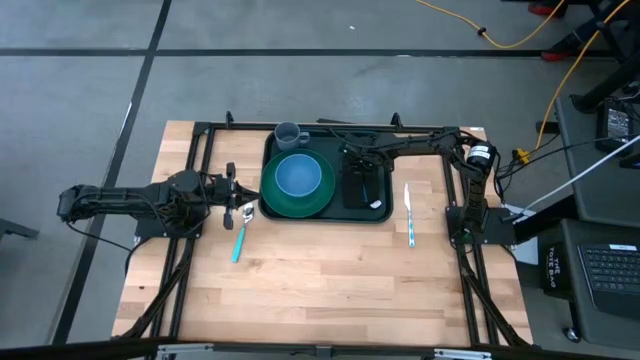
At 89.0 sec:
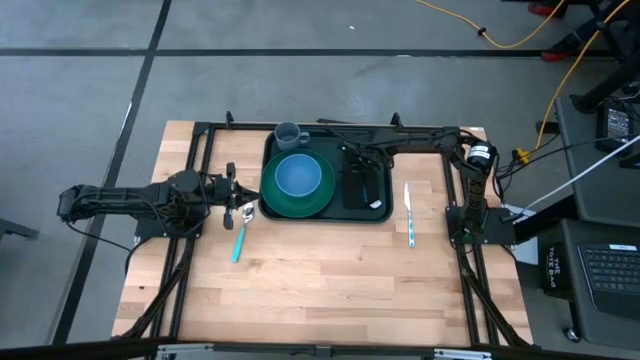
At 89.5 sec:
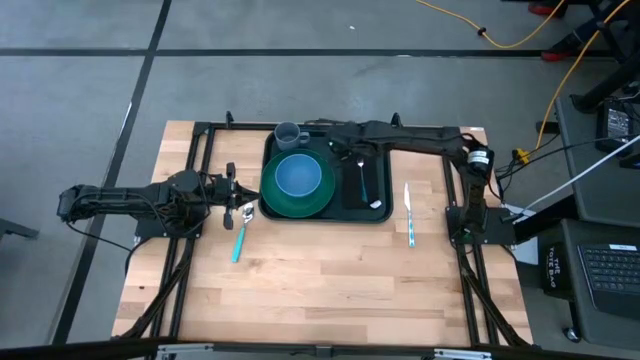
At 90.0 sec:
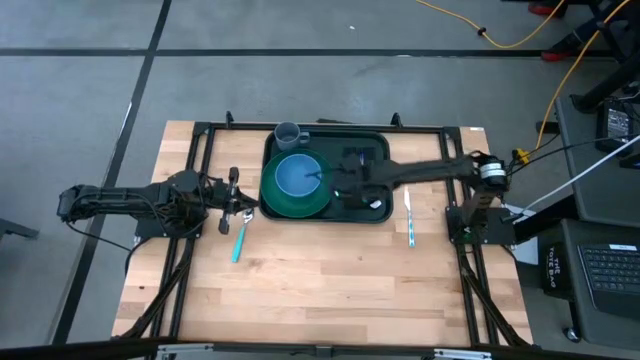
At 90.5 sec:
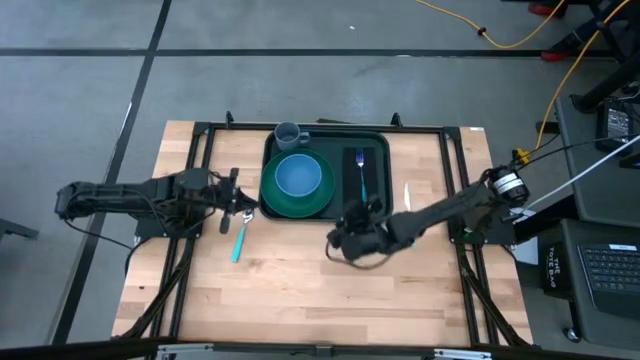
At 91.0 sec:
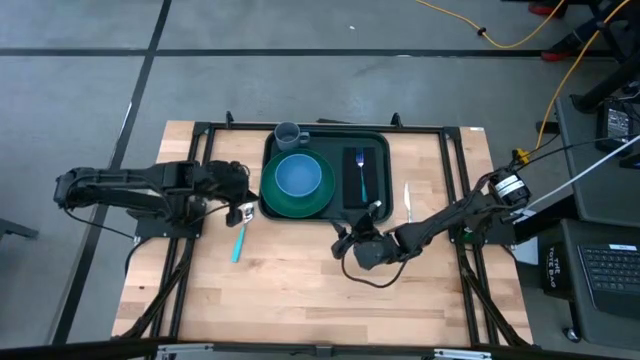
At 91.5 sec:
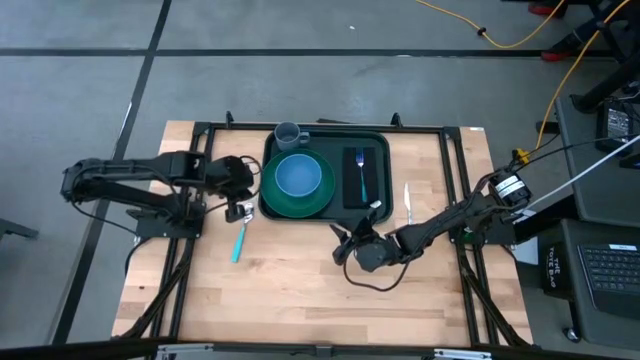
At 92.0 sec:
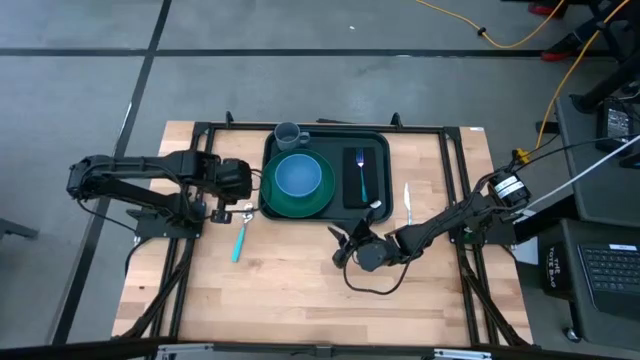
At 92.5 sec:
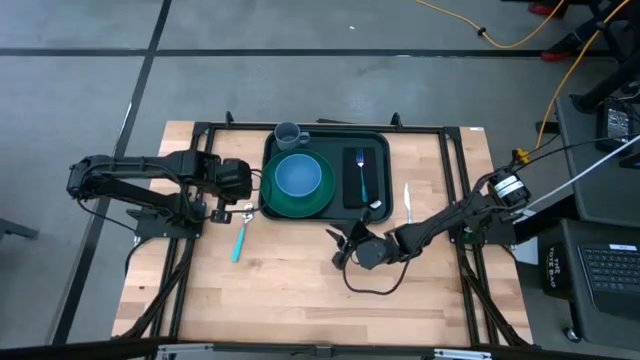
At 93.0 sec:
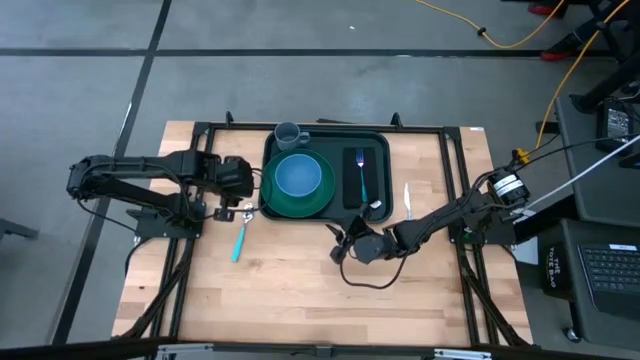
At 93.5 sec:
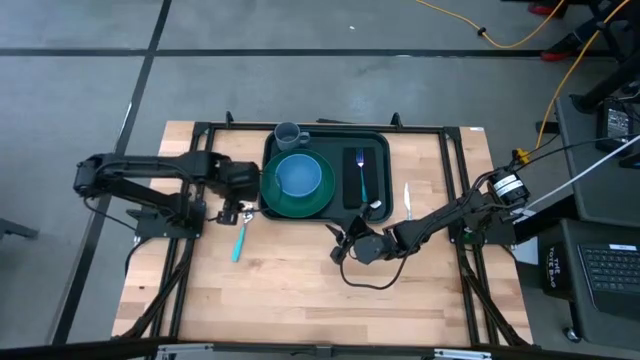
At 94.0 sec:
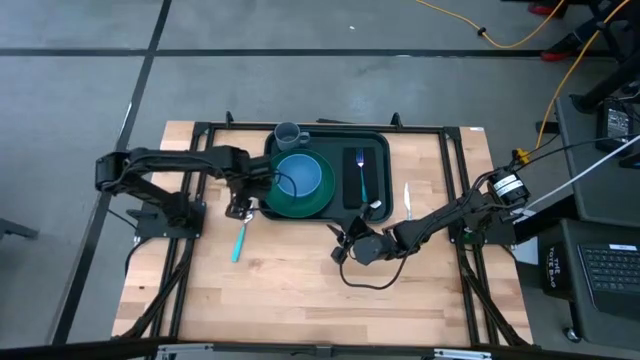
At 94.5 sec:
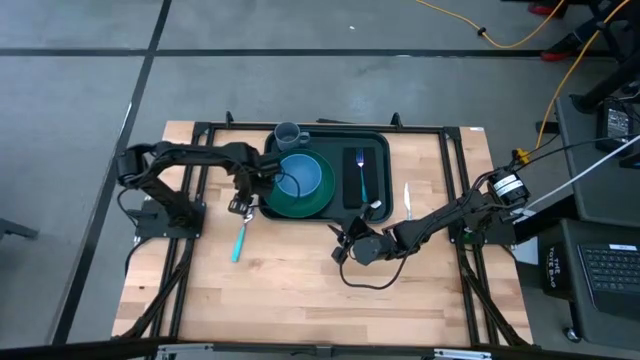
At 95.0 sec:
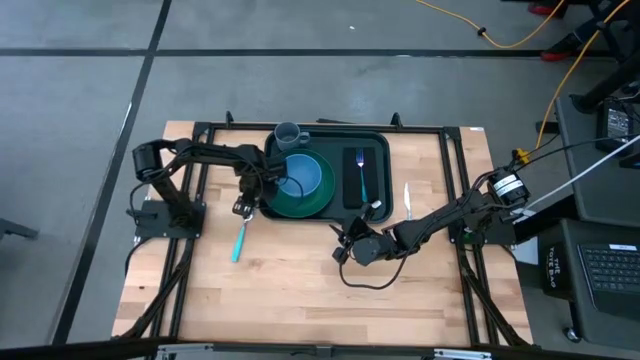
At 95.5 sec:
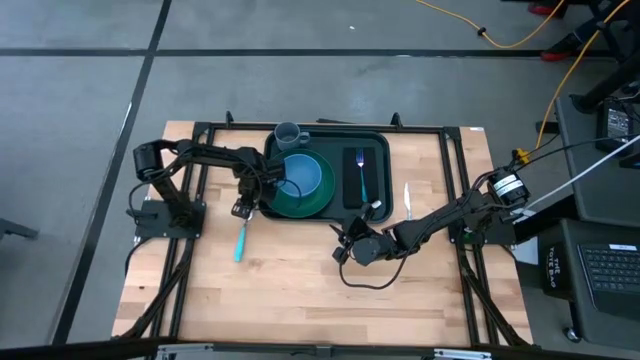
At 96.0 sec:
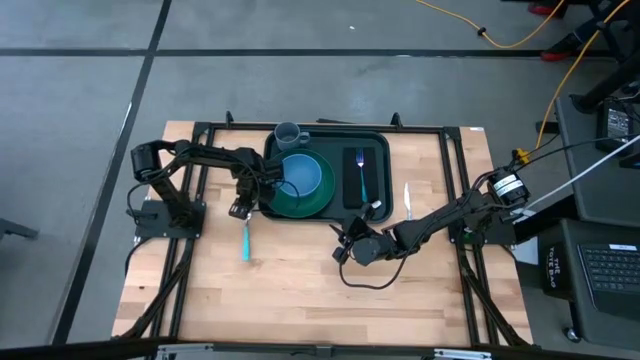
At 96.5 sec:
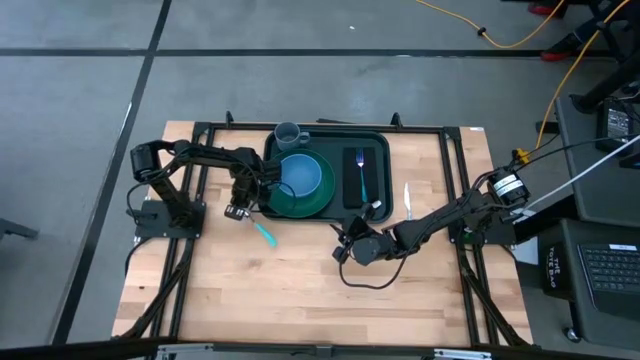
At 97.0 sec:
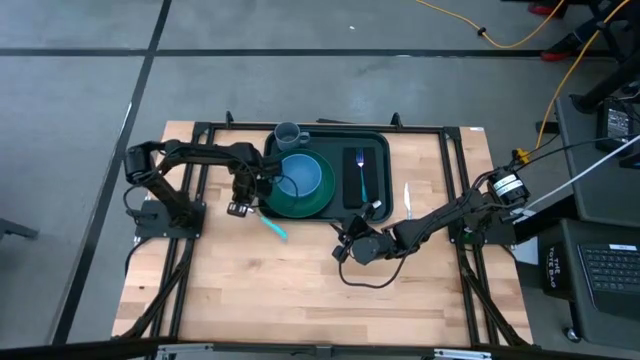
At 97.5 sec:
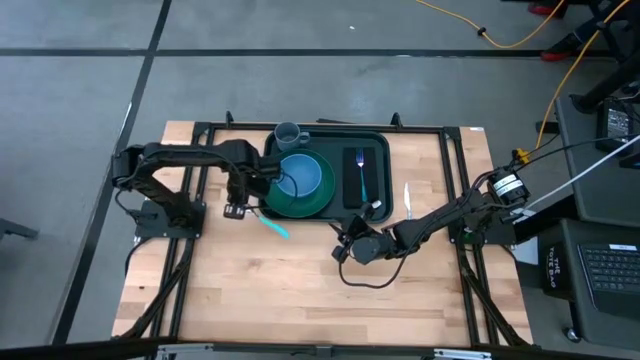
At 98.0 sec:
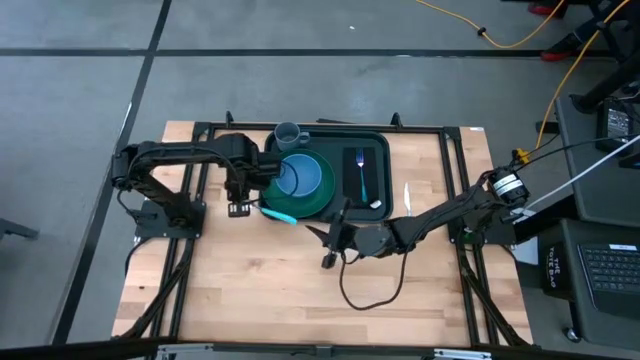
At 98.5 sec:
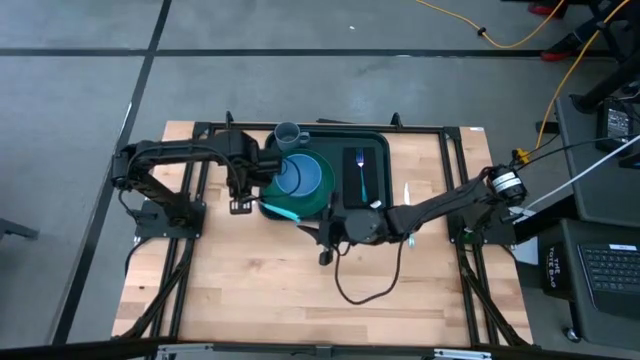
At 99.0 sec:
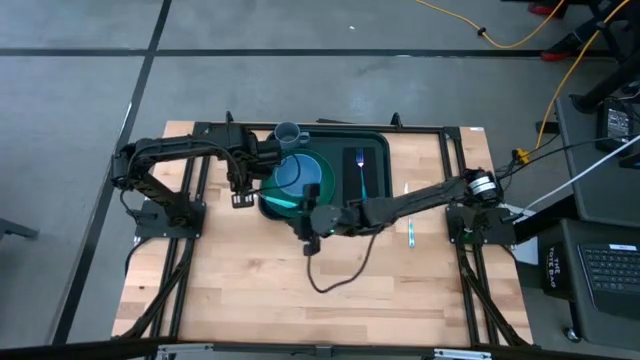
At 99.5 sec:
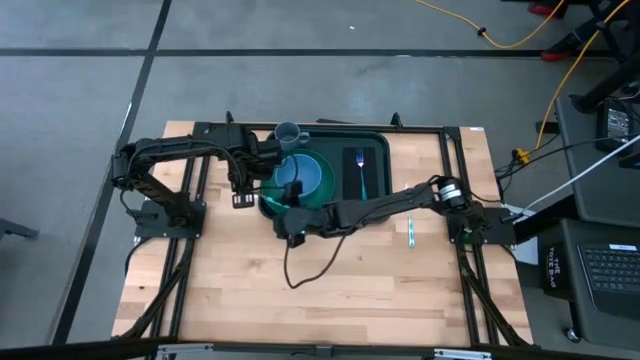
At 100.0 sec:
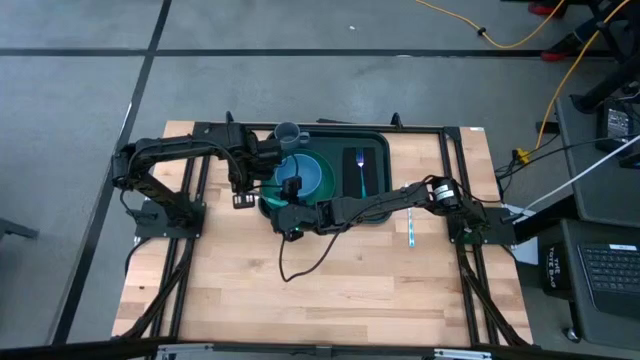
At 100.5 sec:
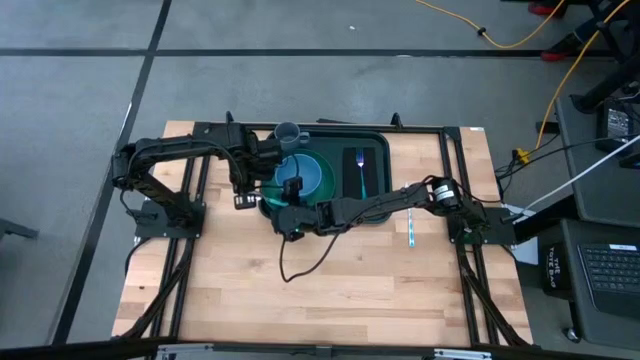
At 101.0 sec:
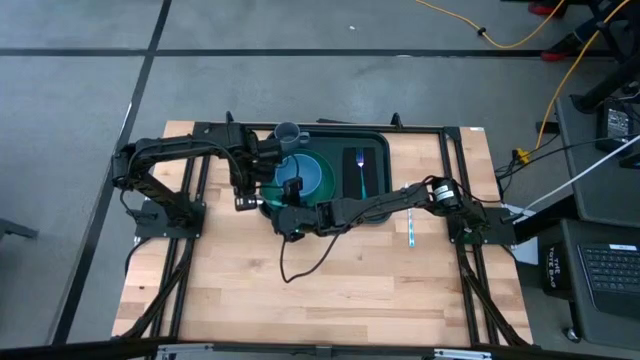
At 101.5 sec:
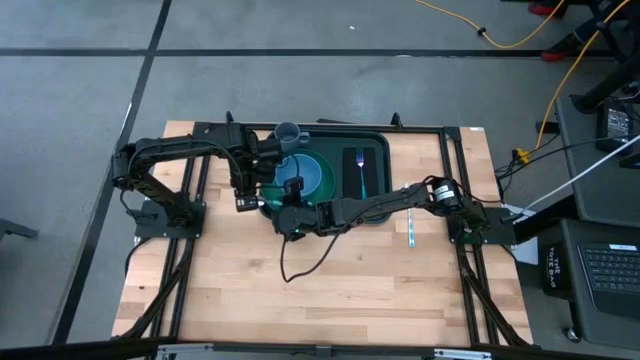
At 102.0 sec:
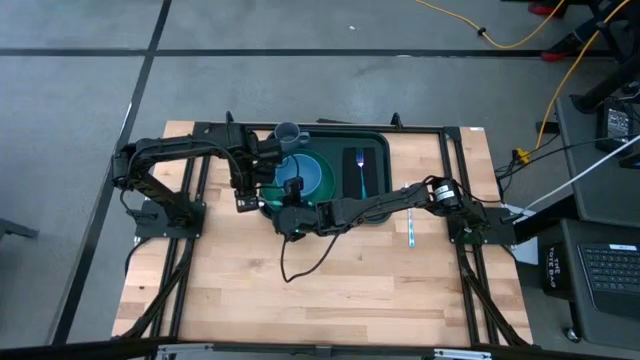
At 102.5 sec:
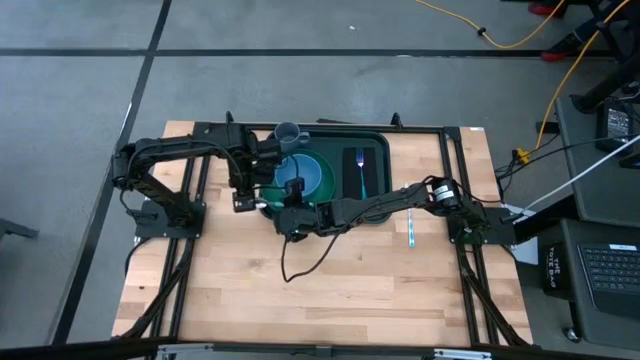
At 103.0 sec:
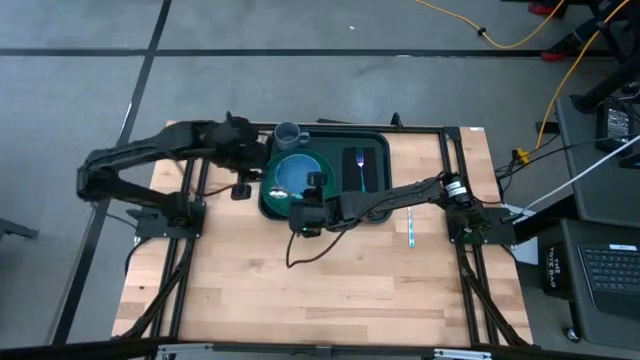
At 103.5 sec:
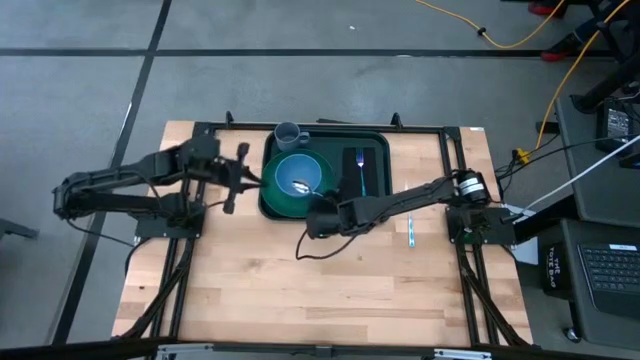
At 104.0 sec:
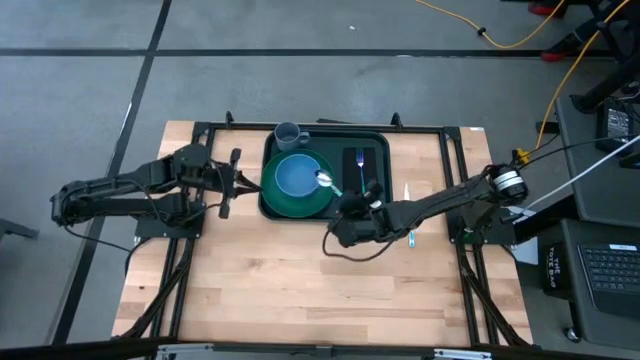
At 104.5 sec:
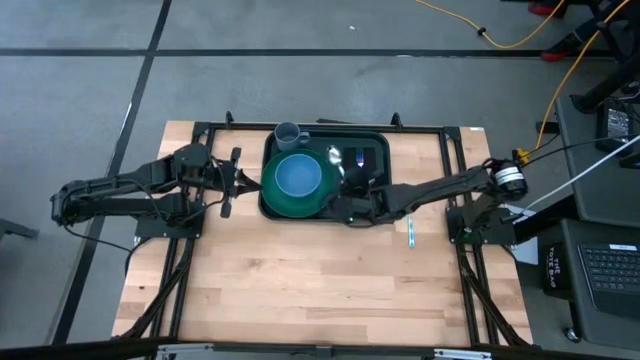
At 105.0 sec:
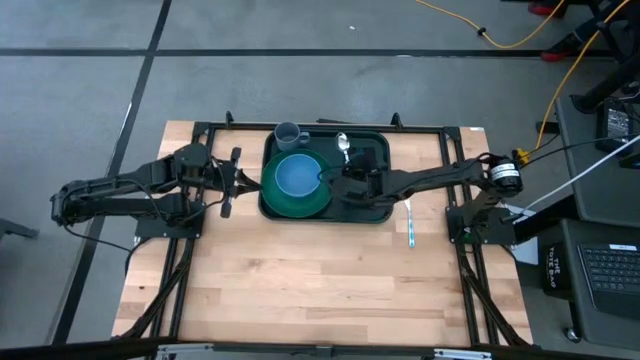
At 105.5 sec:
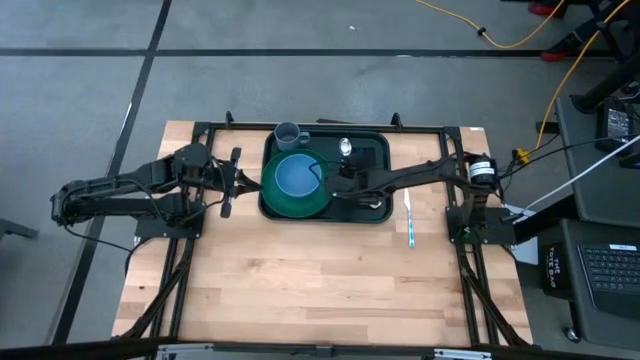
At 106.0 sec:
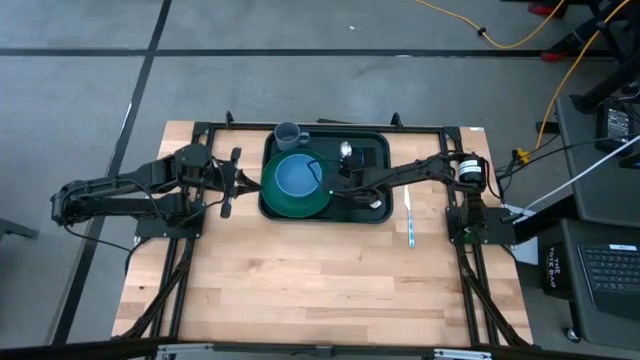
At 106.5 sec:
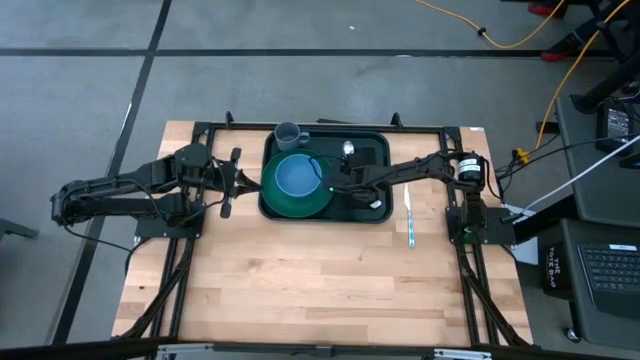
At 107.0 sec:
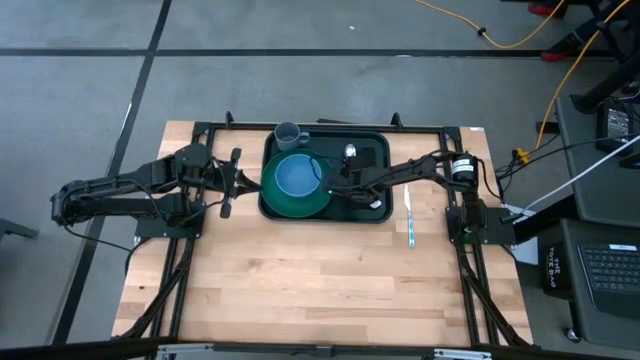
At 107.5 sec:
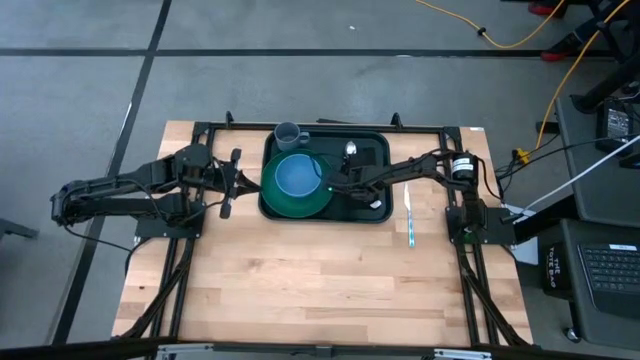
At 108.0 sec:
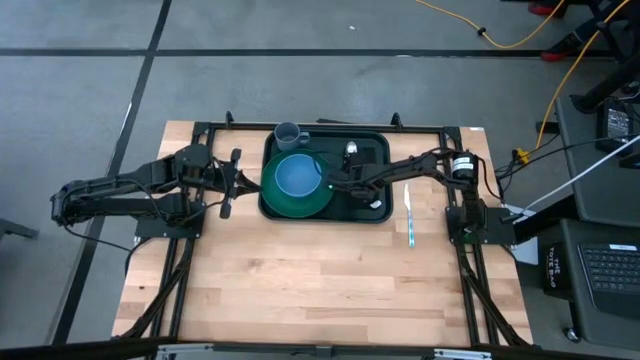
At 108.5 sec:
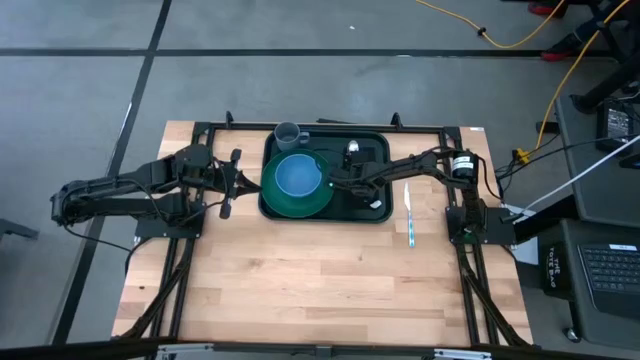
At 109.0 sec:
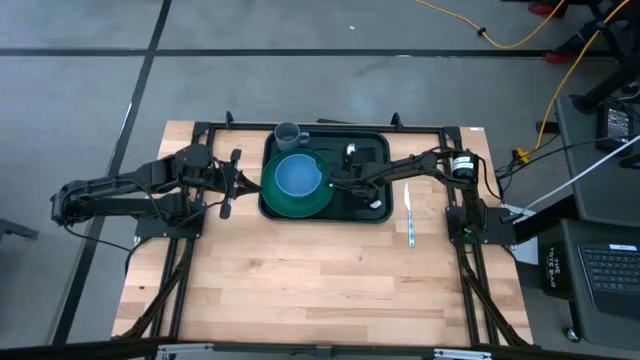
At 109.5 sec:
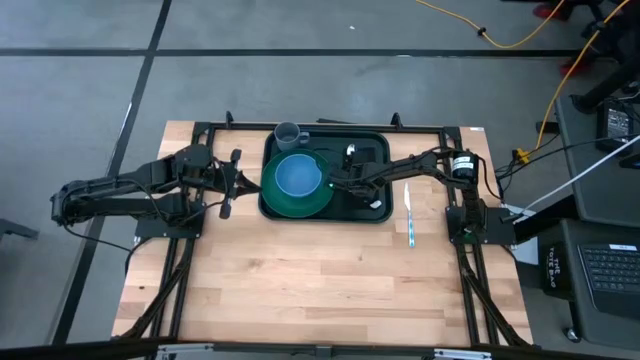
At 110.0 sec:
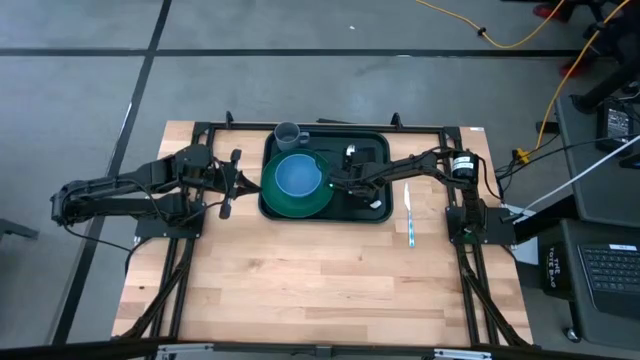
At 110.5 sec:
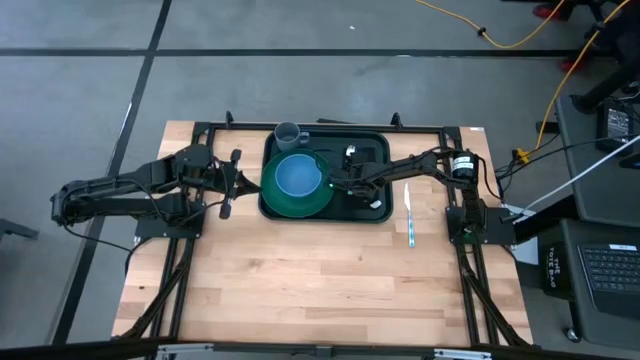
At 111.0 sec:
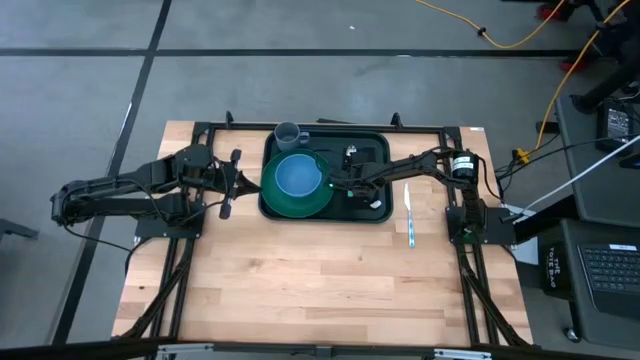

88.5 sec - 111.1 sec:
Task: Set up tray
Put the green spoon on the black napkin to the left of the blue fork
